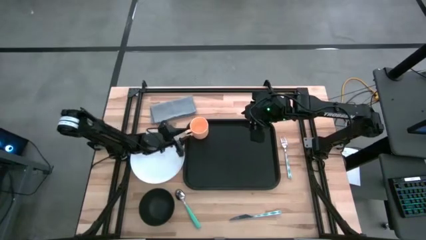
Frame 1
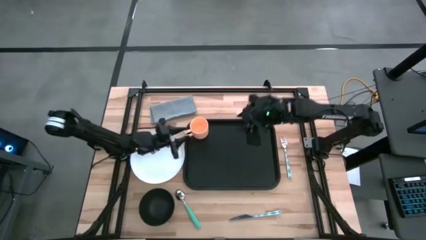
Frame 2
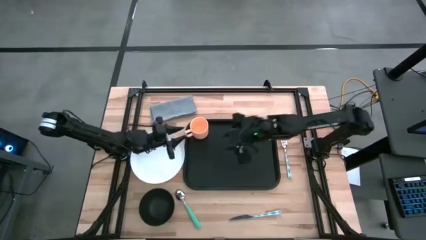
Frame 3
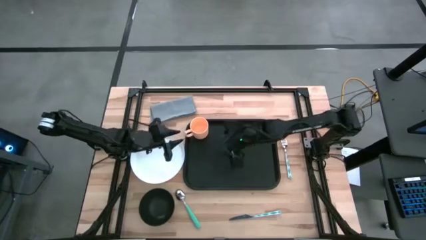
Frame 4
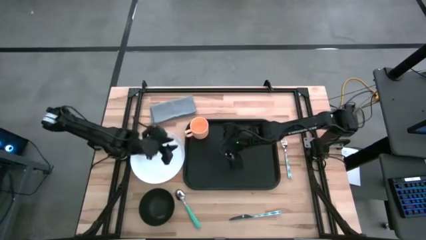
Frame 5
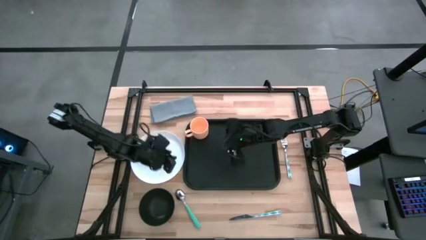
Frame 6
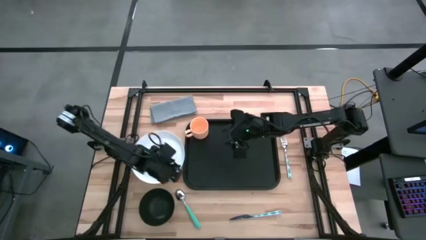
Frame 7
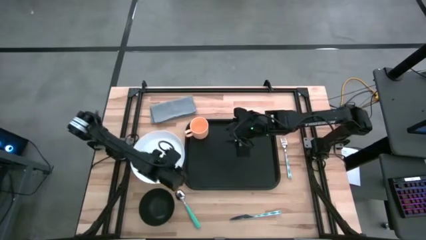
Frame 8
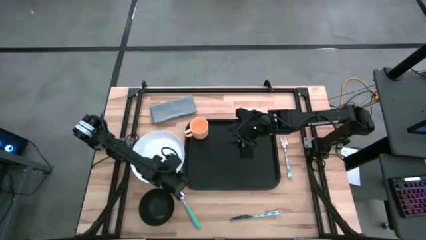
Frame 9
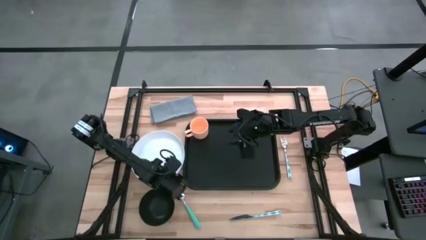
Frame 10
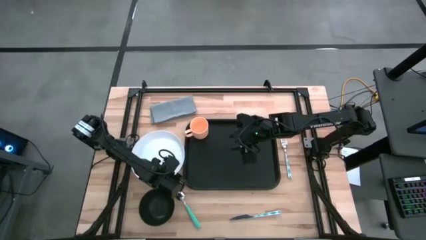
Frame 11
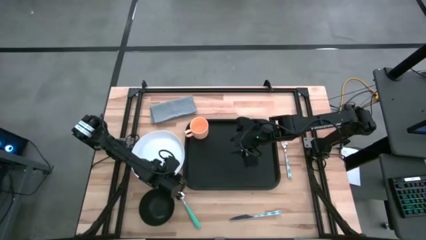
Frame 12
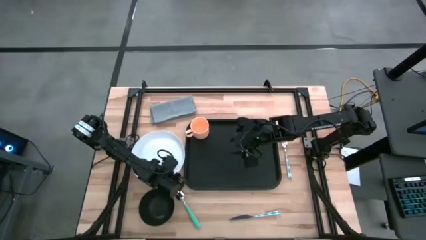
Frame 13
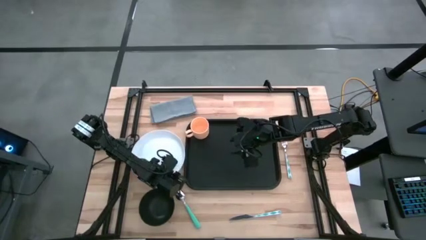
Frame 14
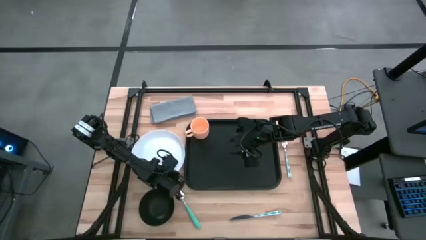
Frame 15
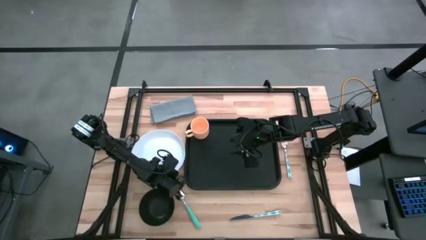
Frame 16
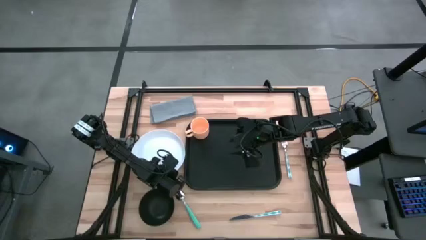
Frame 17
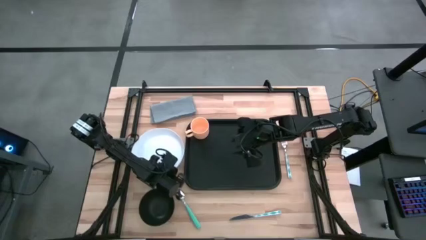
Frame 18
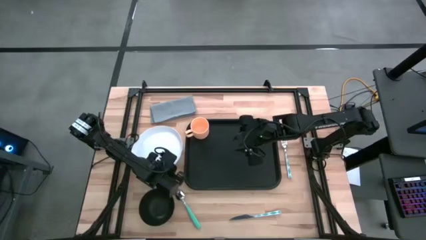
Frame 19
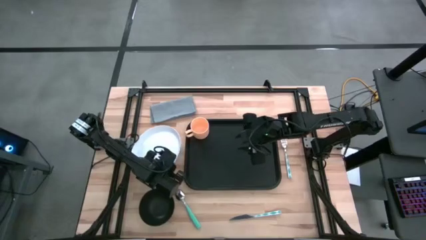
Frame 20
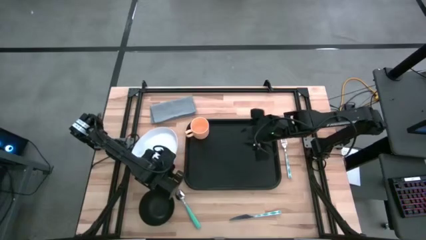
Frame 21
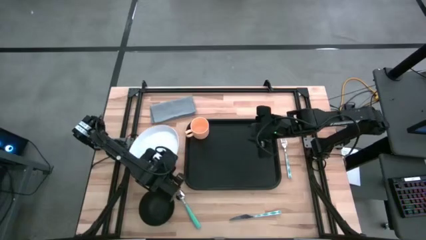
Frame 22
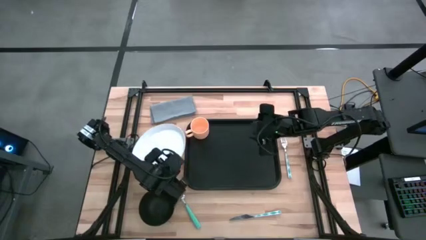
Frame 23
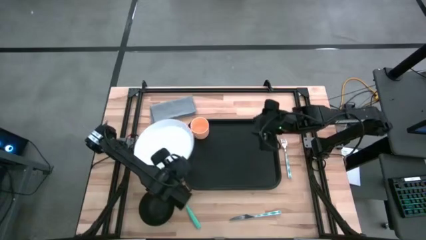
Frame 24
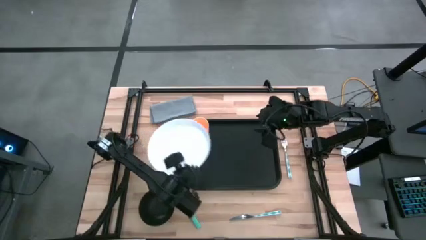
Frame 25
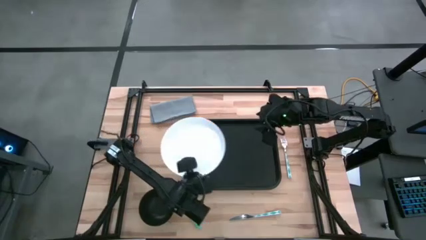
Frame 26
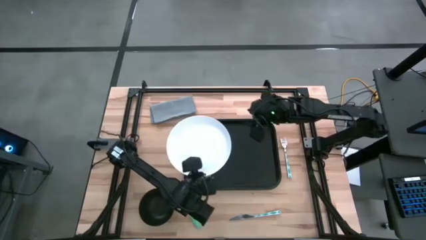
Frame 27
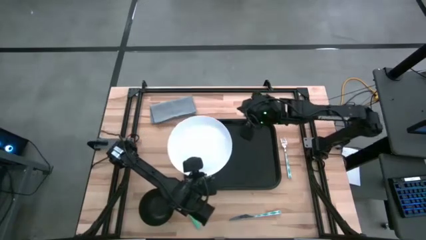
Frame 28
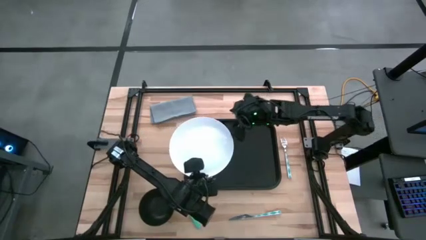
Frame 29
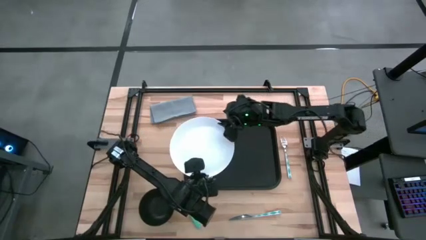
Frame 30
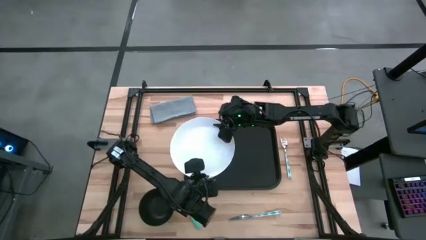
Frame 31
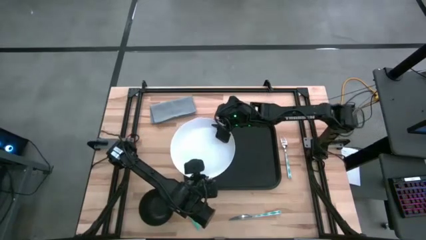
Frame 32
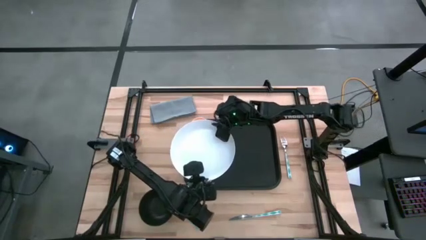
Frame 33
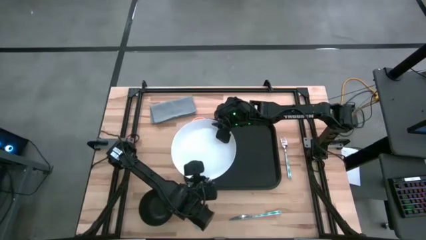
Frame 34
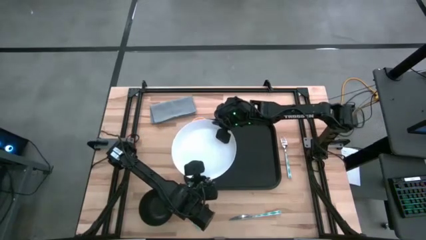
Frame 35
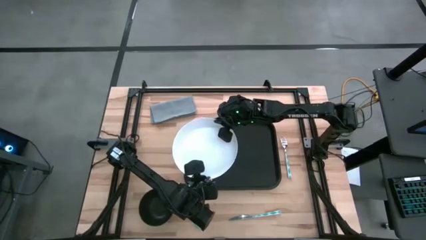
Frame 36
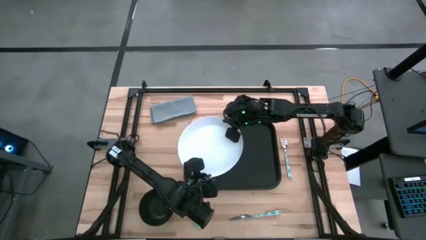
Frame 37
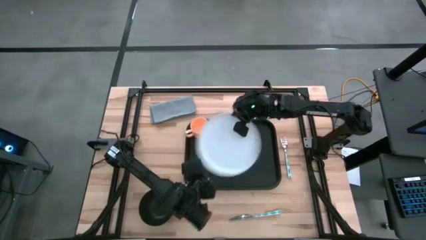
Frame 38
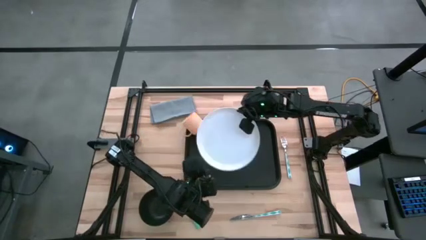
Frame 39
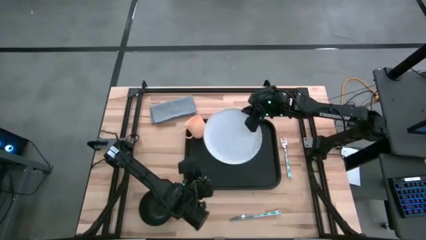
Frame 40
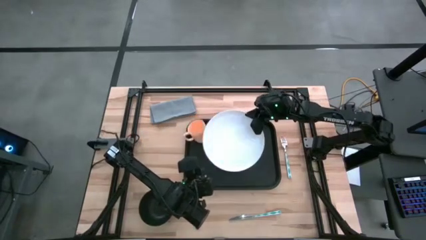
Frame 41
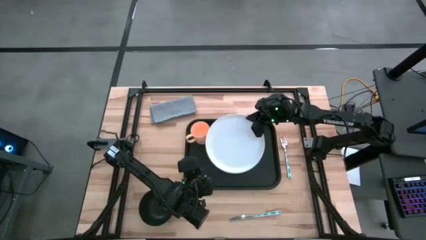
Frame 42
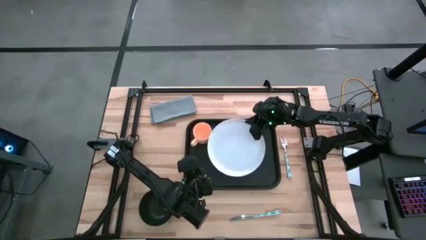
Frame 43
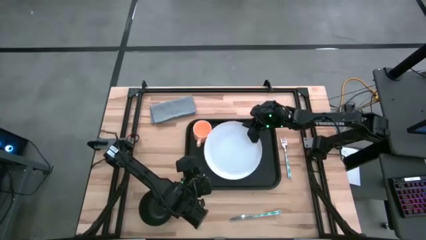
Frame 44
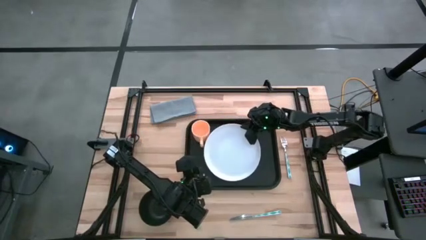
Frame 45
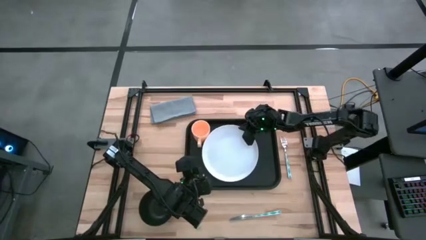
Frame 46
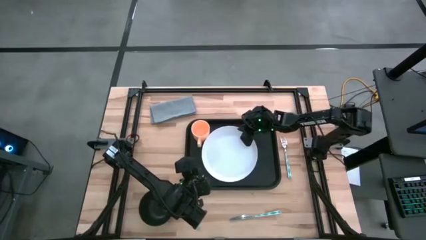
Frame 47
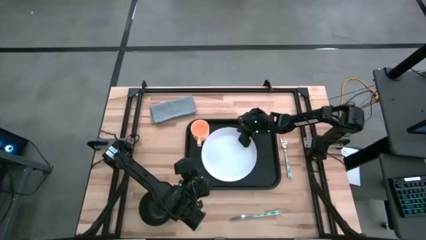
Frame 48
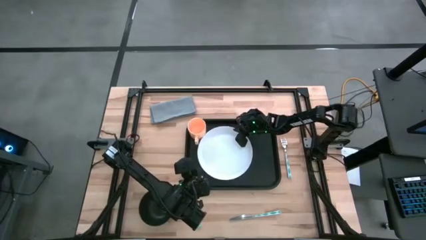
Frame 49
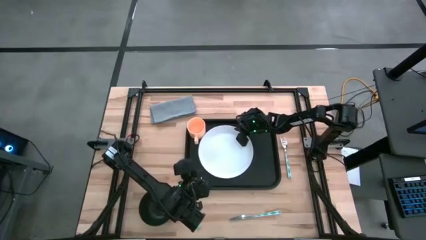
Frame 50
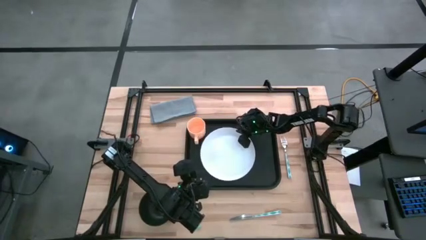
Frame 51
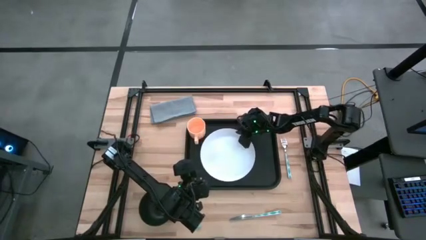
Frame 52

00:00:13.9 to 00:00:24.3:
Task: Set up tray
Put the white plate on the black tray to the bottom right of the orange mug

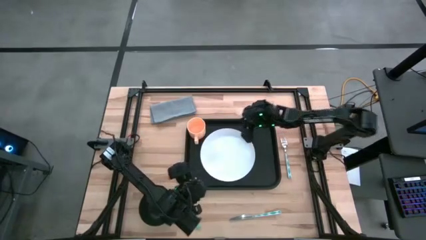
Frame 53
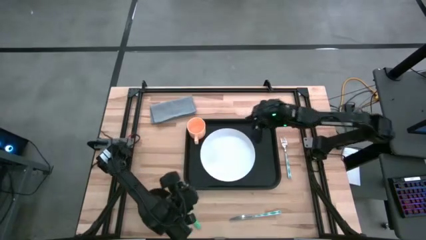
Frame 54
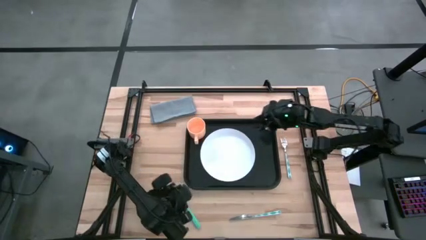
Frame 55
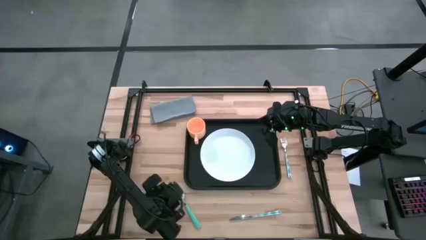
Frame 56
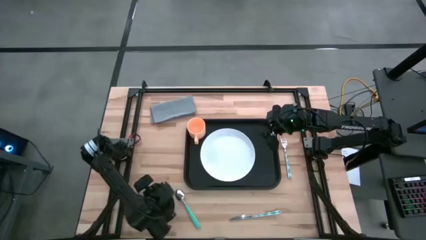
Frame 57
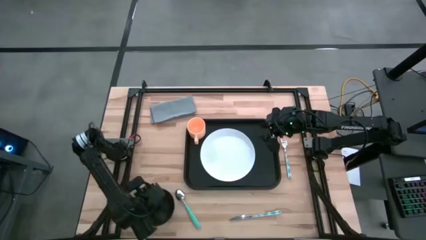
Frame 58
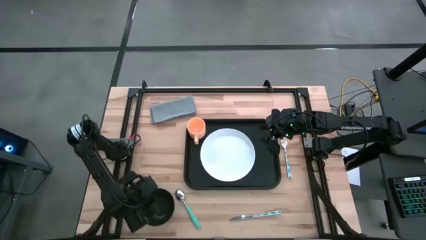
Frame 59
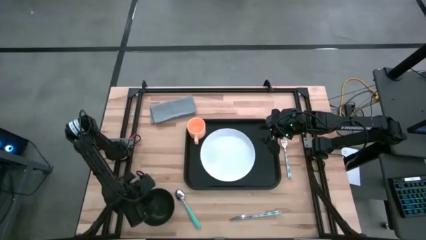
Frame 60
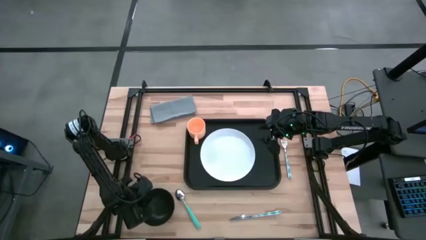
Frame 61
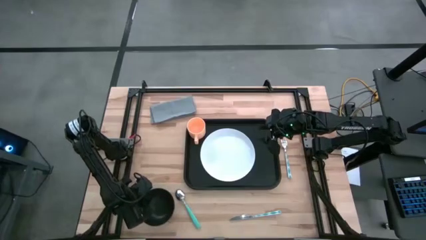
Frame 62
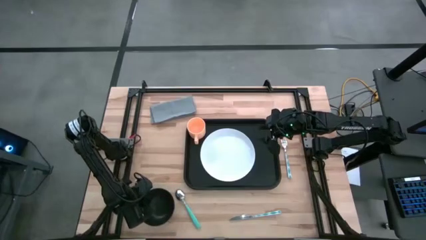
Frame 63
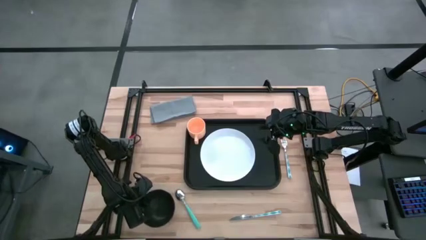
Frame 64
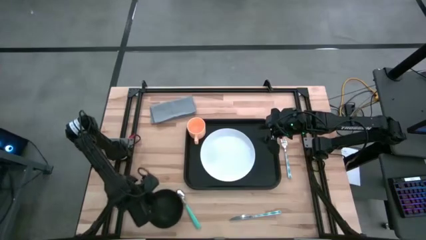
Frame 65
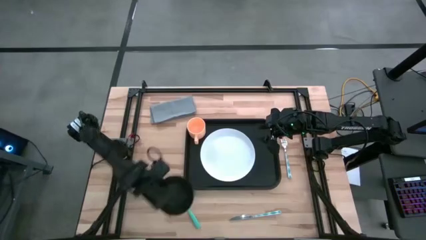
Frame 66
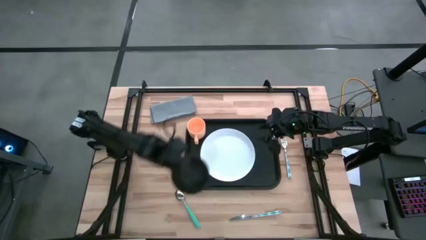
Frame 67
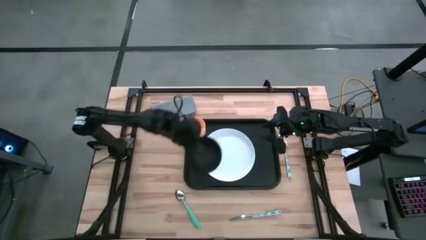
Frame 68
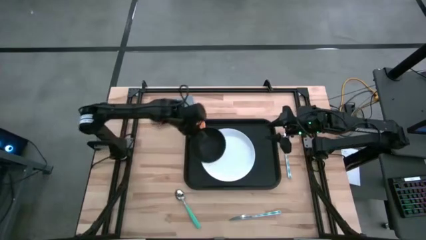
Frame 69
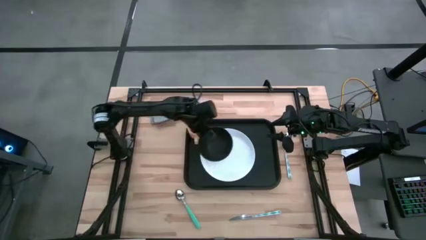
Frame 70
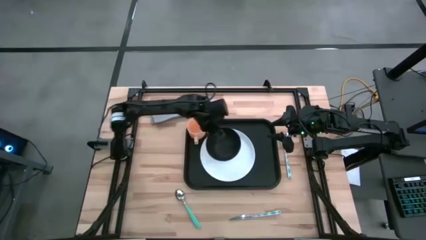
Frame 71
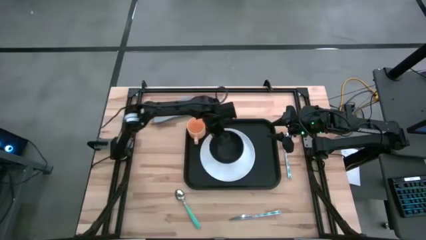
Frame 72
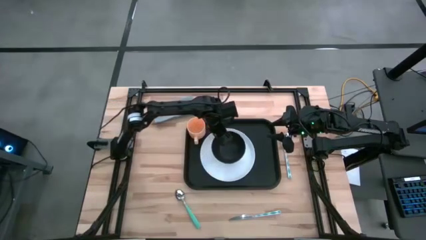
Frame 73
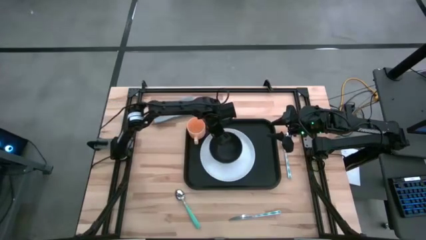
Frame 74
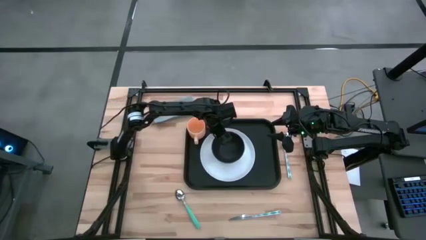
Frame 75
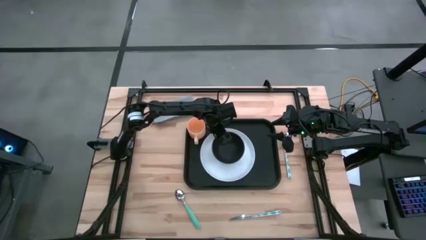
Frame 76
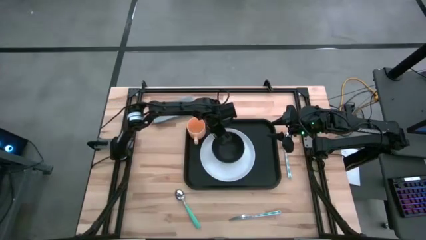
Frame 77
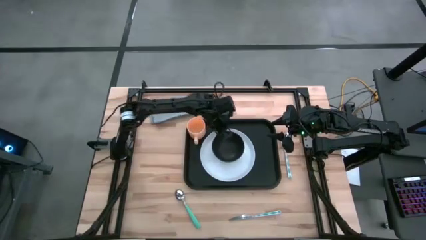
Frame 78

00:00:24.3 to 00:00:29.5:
Put the black bowl on top of the white plate on the black tray
